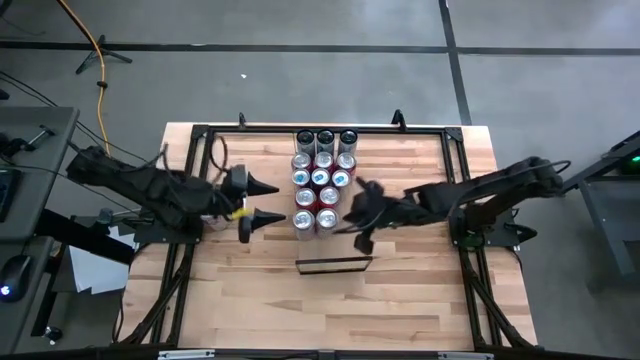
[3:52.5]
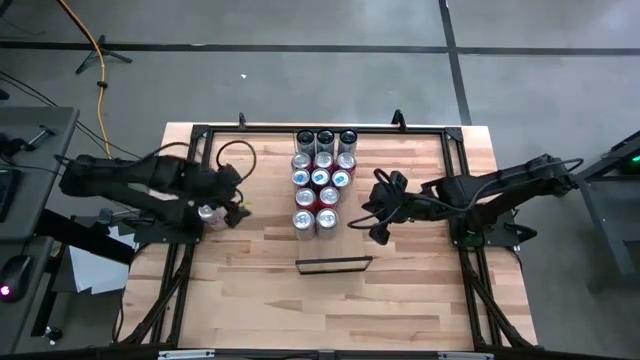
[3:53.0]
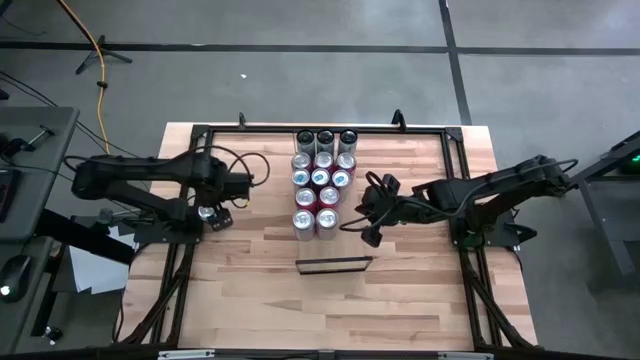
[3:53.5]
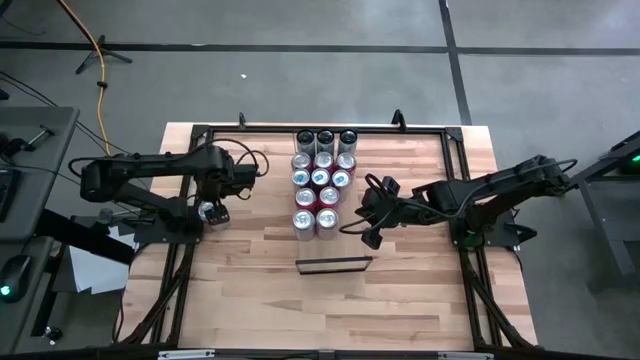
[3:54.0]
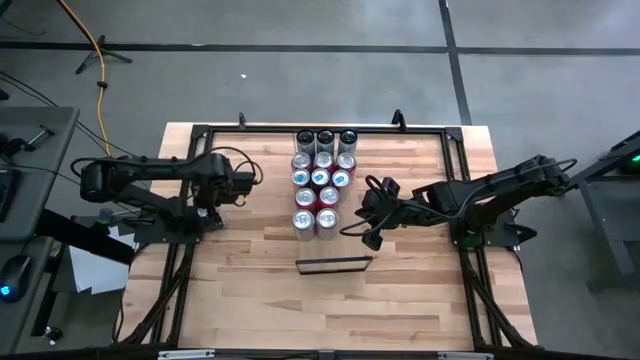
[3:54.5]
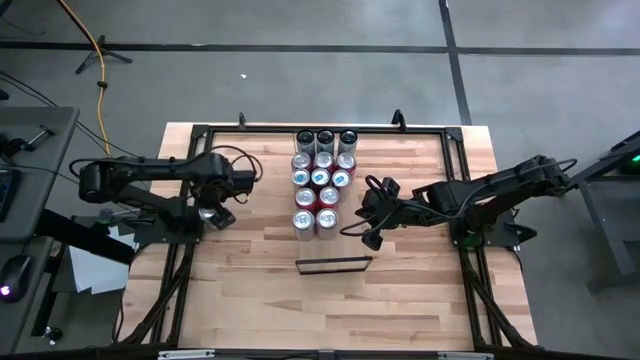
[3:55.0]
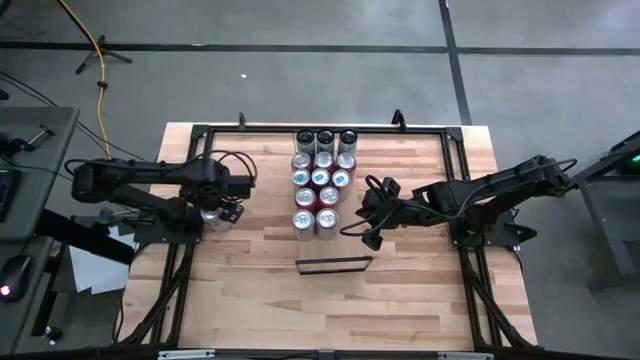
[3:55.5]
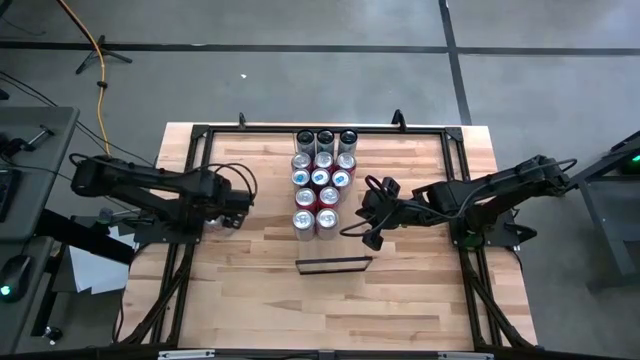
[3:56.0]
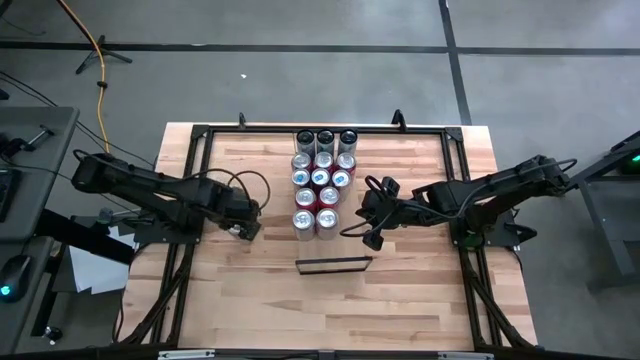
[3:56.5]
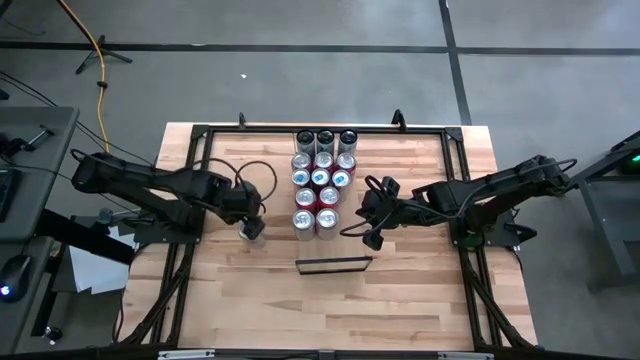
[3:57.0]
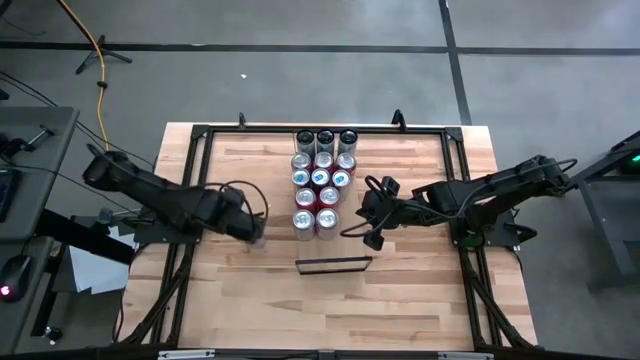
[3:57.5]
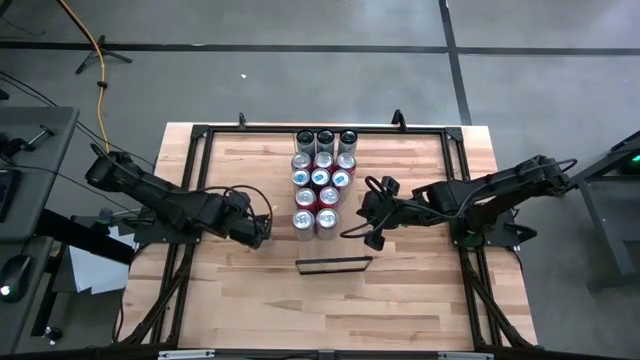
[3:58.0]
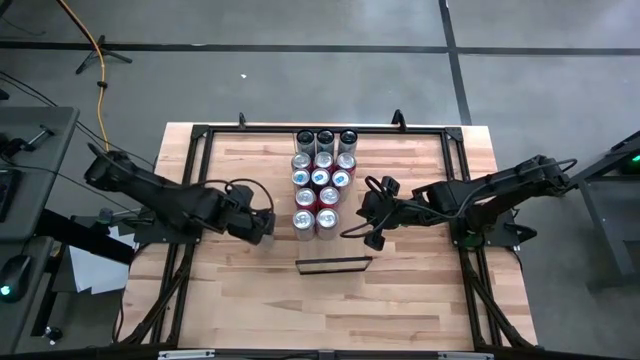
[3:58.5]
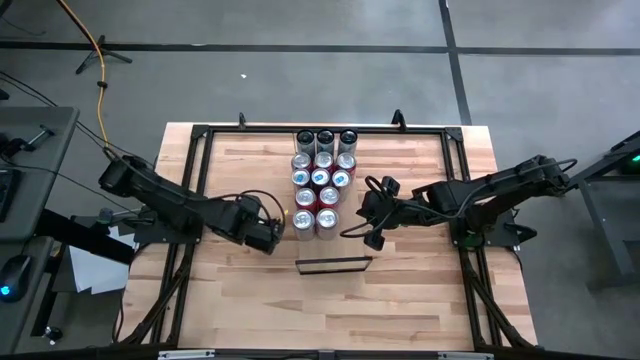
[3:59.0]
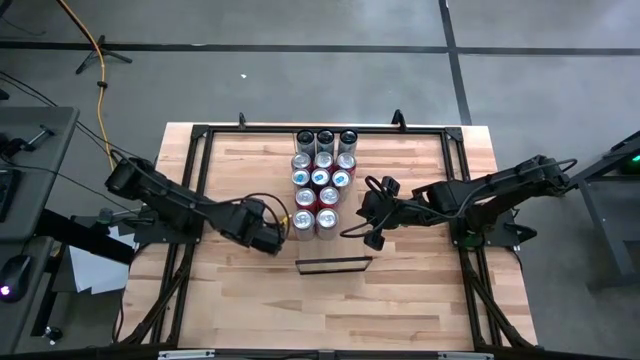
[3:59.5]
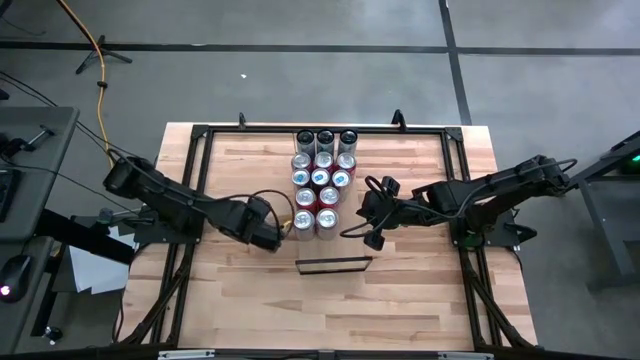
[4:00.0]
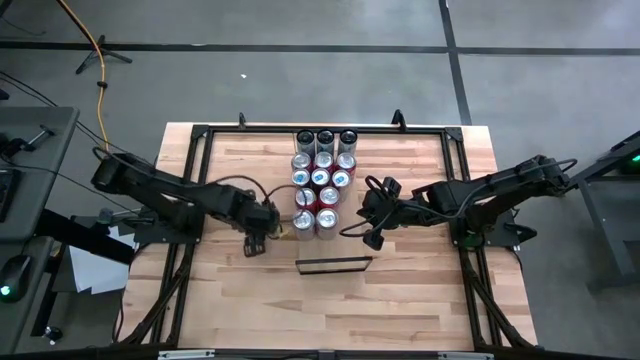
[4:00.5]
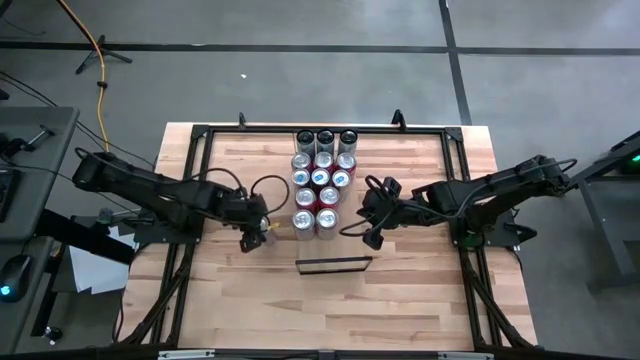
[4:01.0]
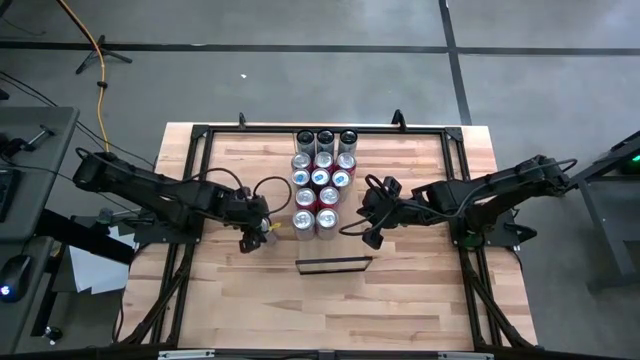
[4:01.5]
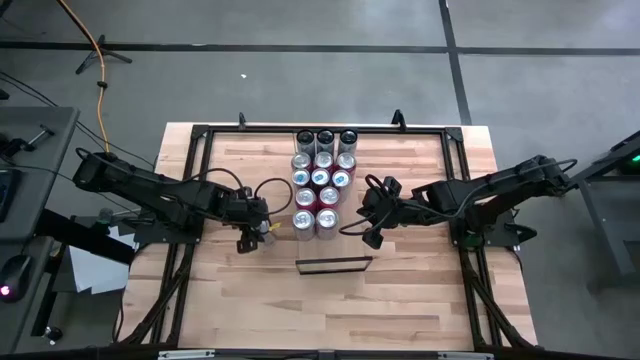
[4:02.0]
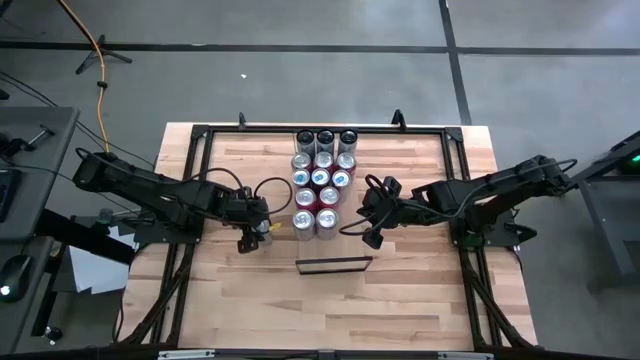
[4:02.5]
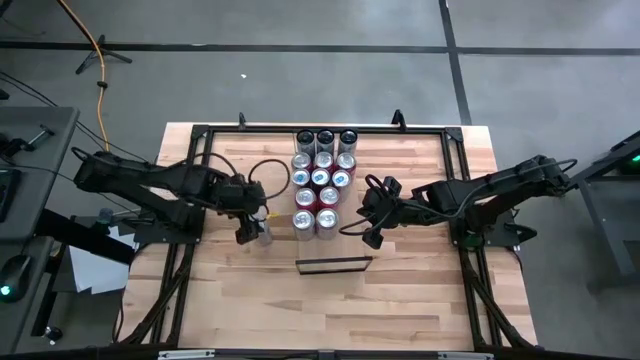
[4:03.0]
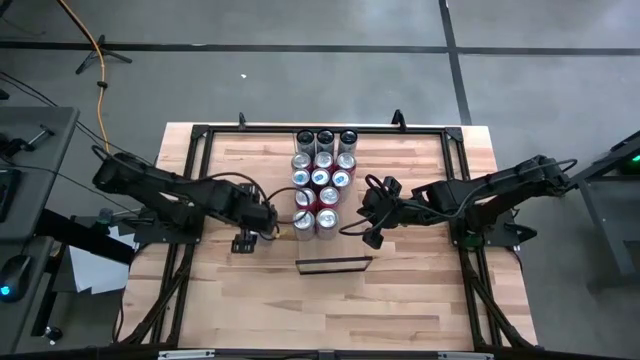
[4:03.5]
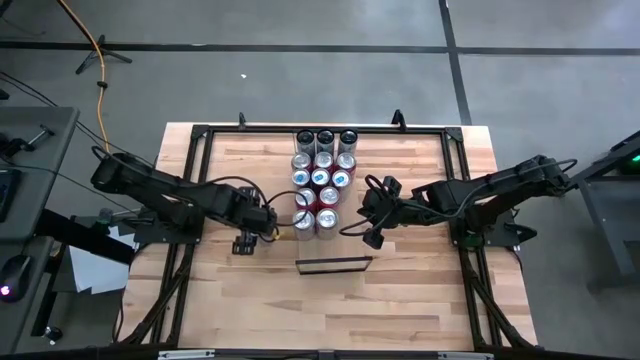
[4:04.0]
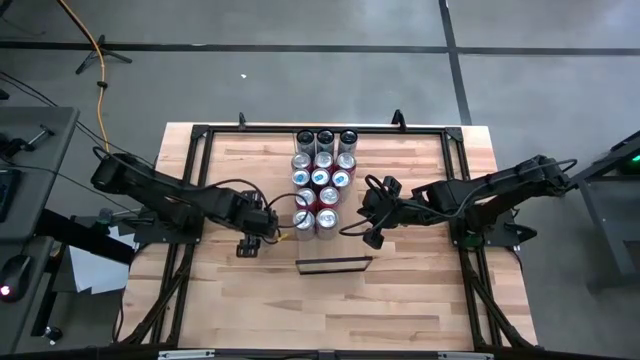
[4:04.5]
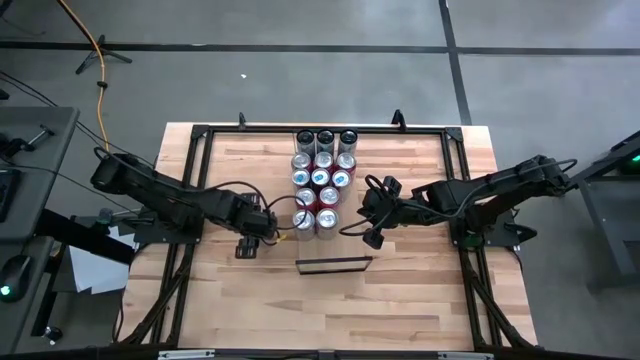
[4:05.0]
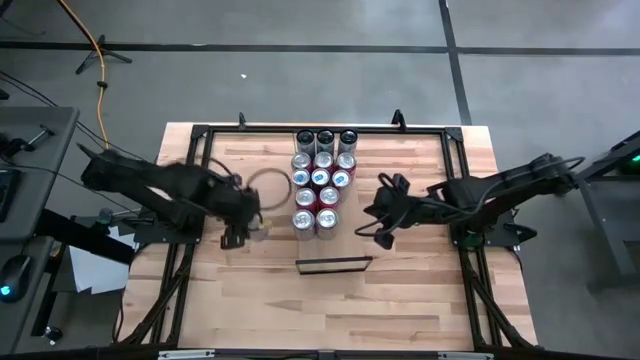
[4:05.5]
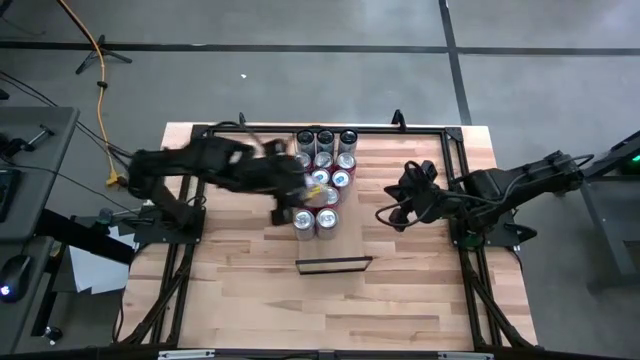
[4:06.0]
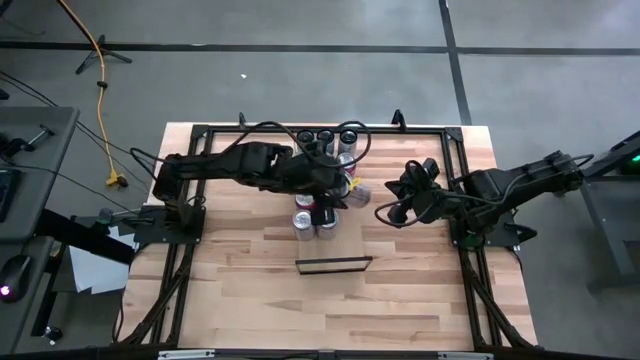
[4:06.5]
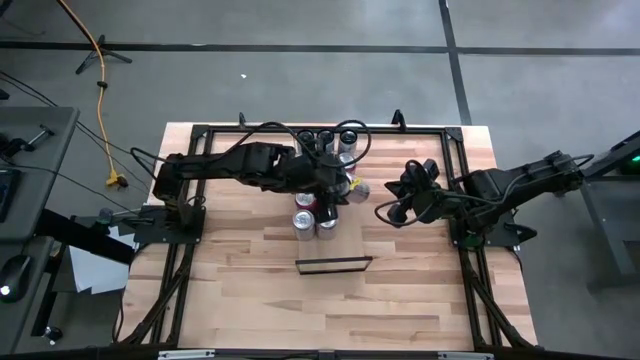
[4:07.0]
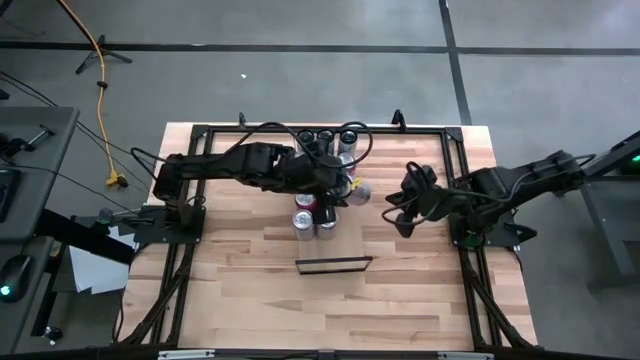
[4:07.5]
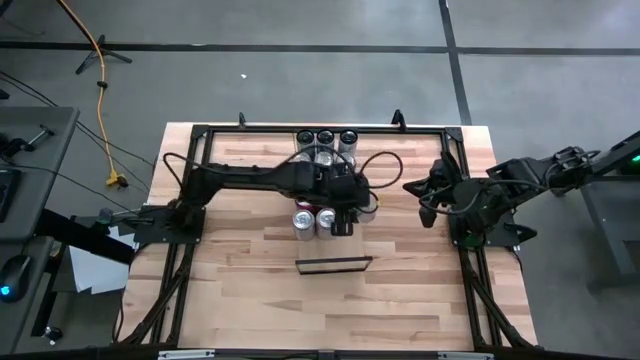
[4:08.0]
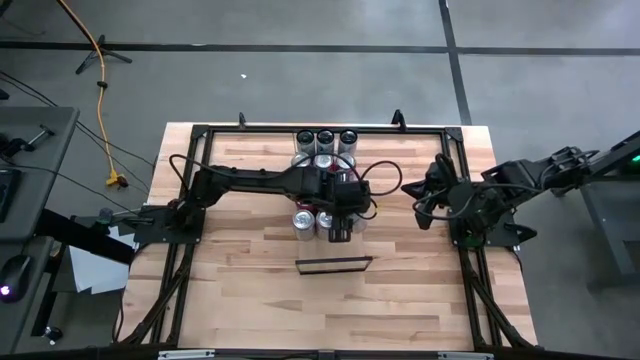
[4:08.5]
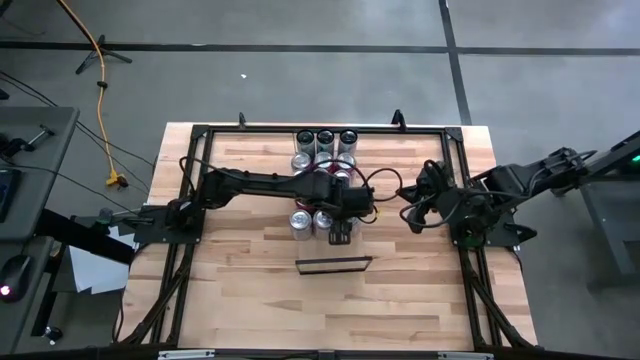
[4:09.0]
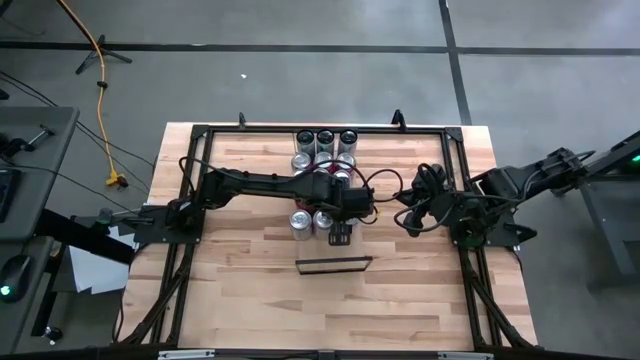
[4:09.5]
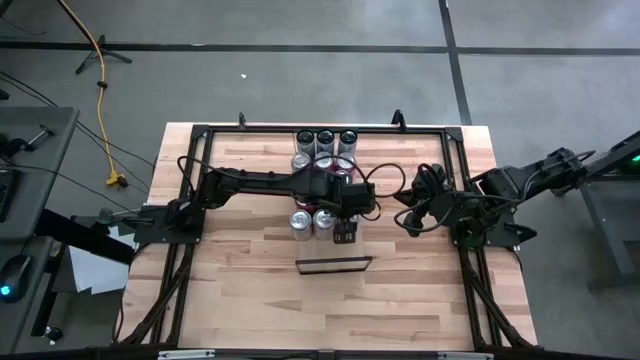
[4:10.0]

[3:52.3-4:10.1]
Task: Place canned beverage on shelf
Put the red/silver soda can on the shelf aligned with the other red/silver soda cans

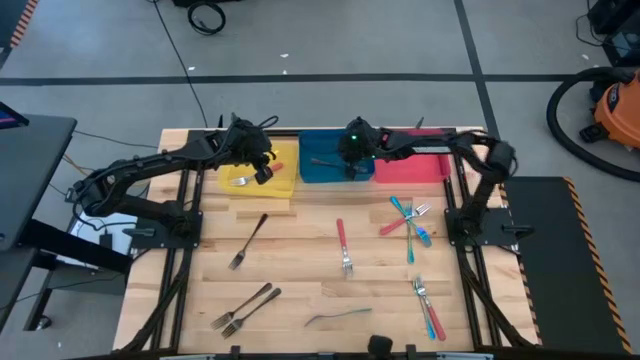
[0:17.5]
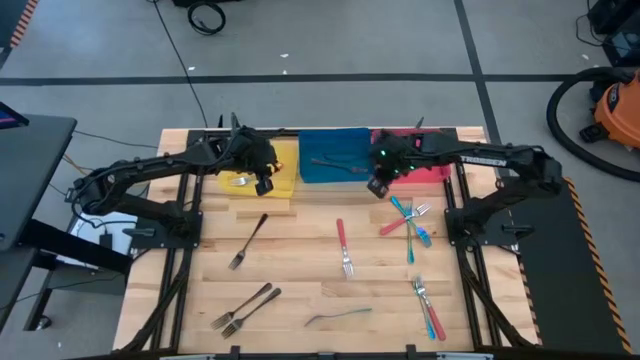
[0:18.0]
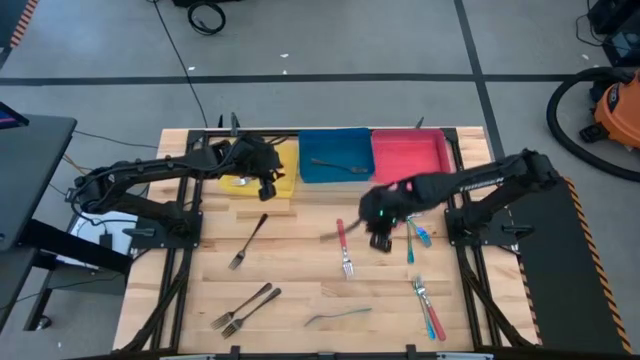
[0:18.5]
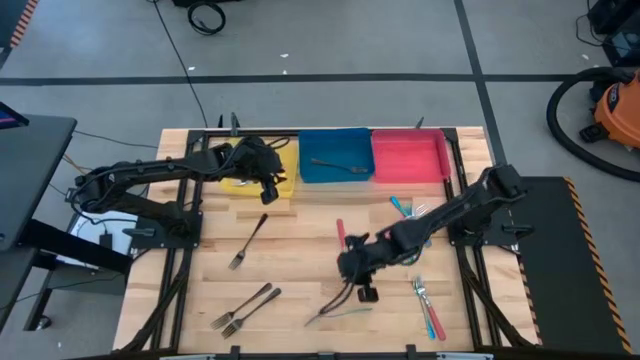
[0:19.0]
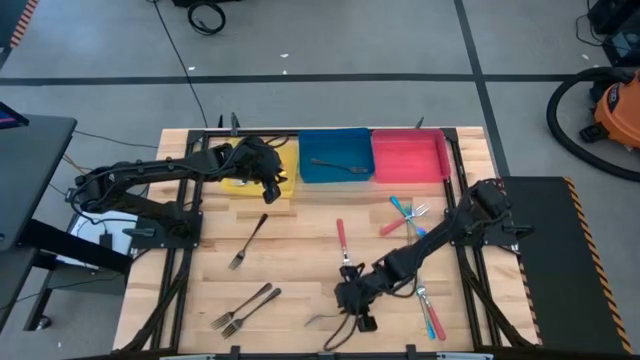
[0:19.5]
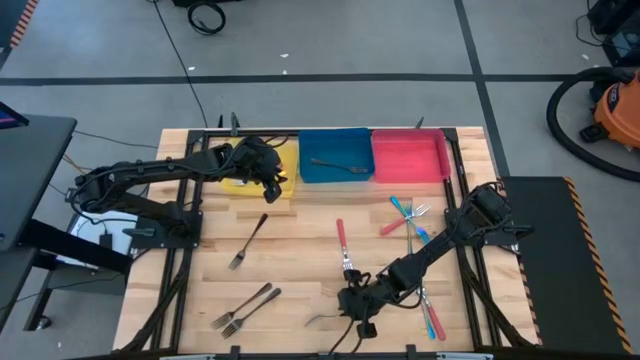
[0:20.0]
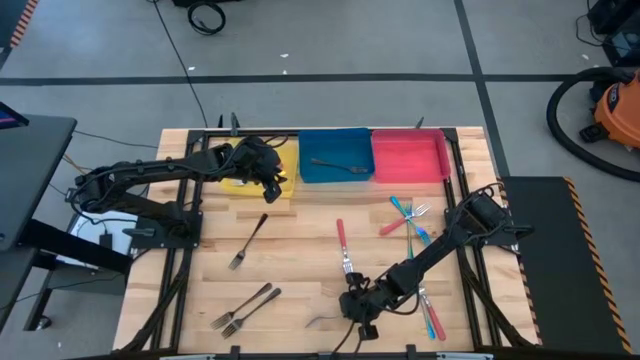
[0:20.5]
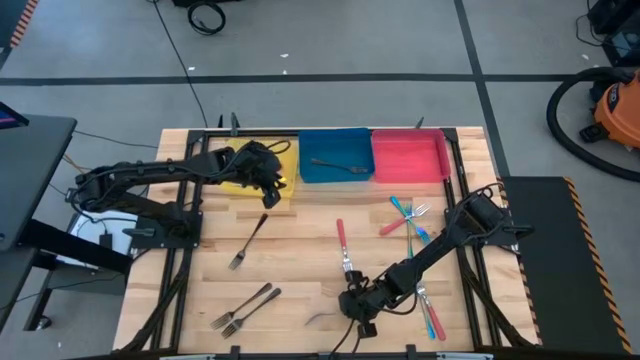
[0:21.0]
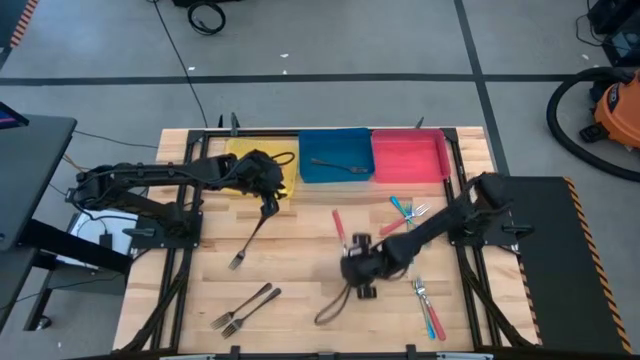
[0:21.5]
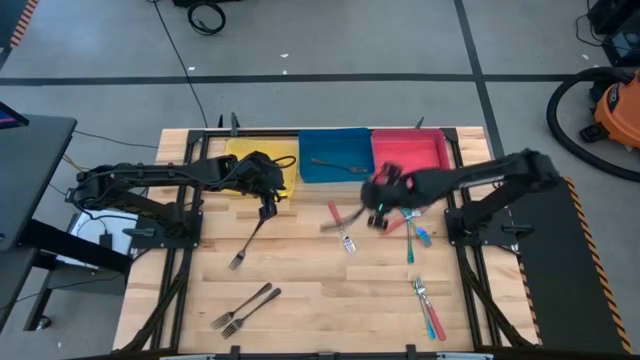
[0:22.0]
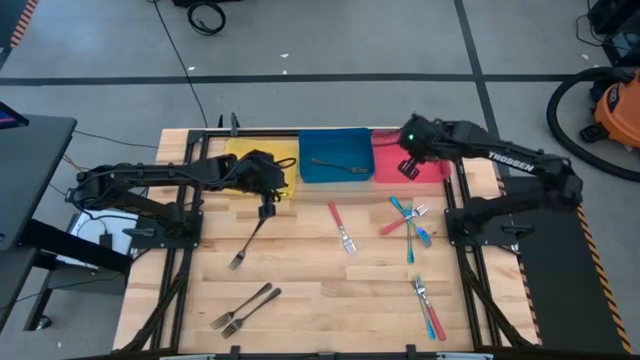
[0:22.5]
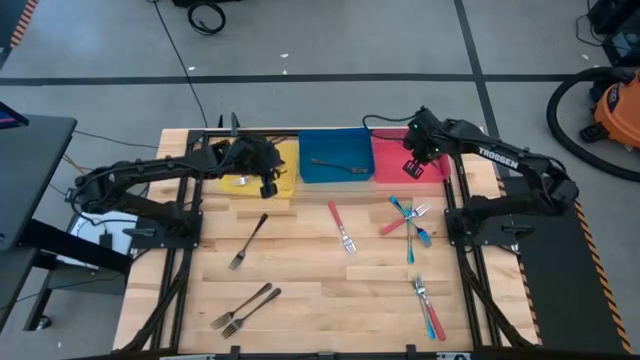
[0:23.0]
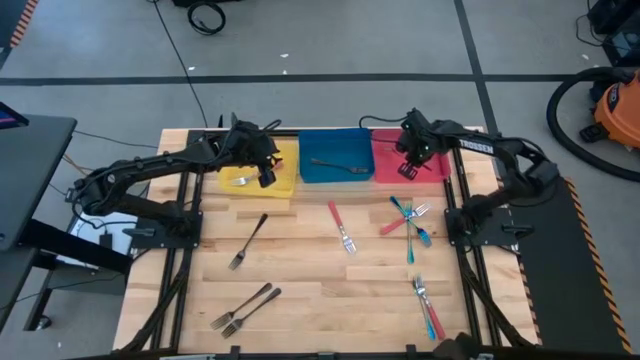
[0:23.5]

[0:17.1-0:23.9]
Task: Sort silverware by color (type)
Put the bottom left blue fork into the red bin
